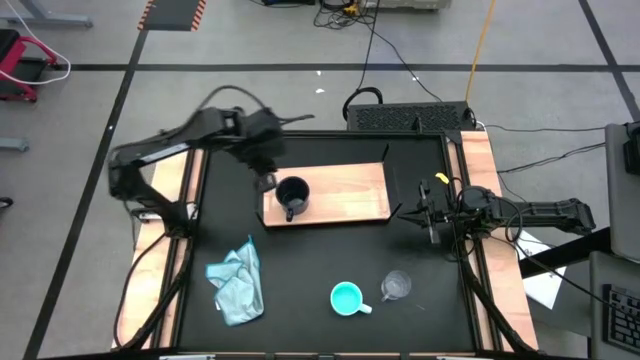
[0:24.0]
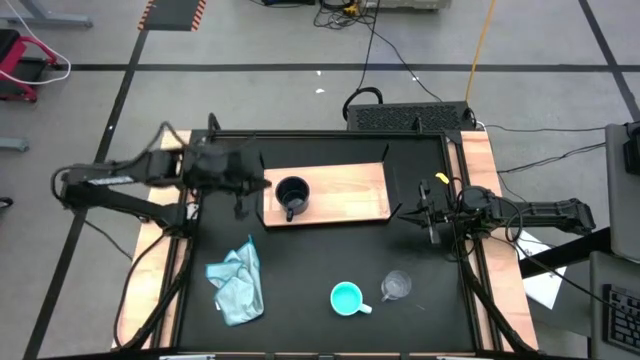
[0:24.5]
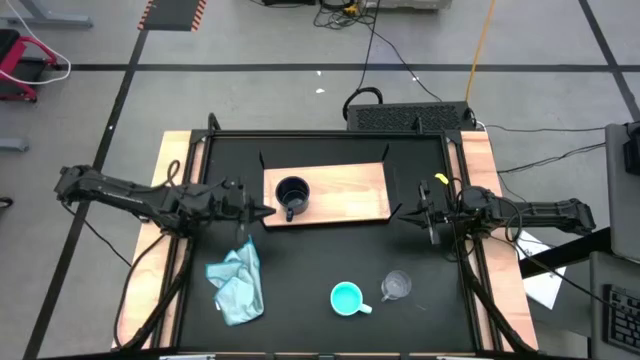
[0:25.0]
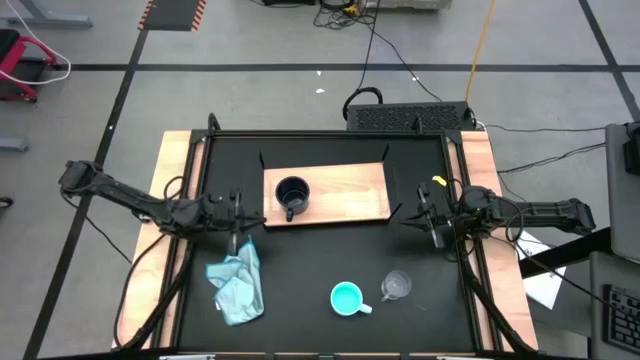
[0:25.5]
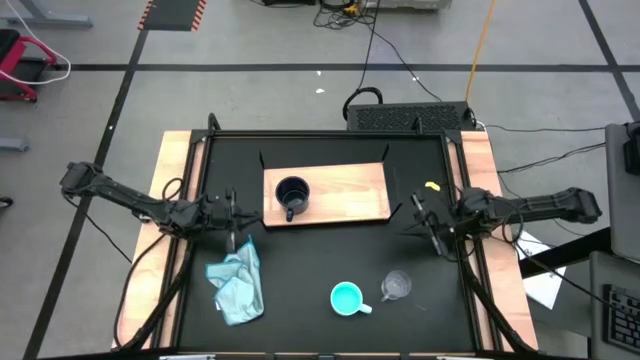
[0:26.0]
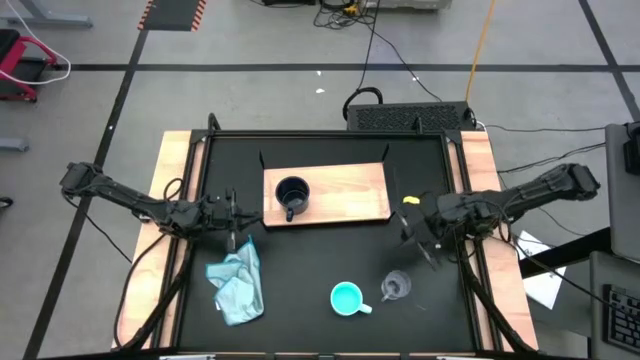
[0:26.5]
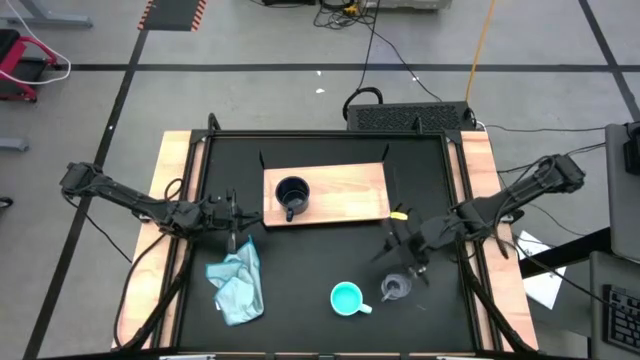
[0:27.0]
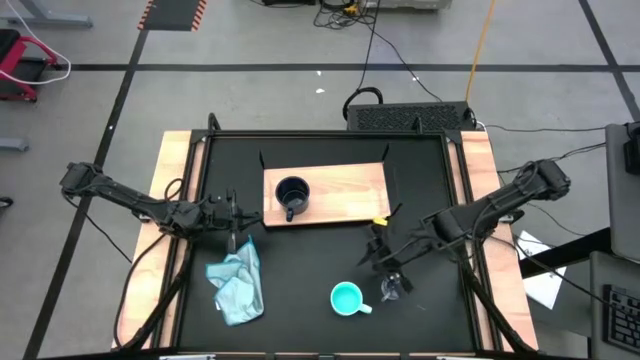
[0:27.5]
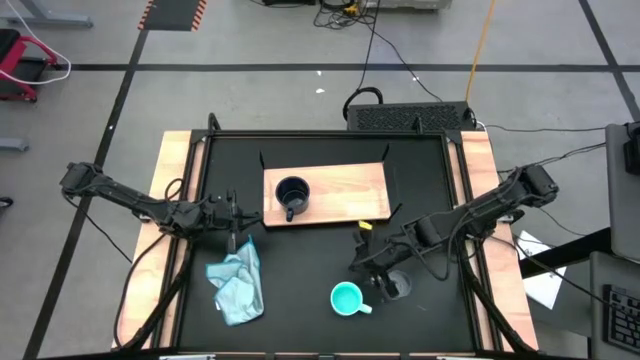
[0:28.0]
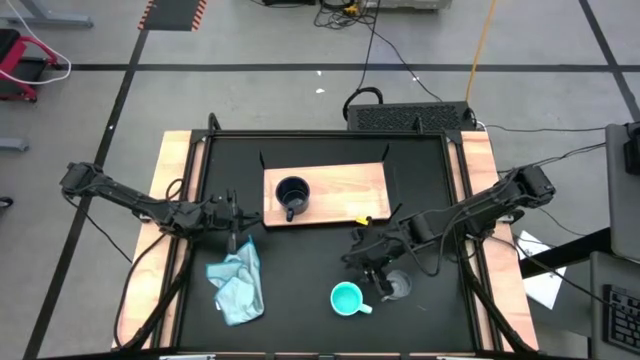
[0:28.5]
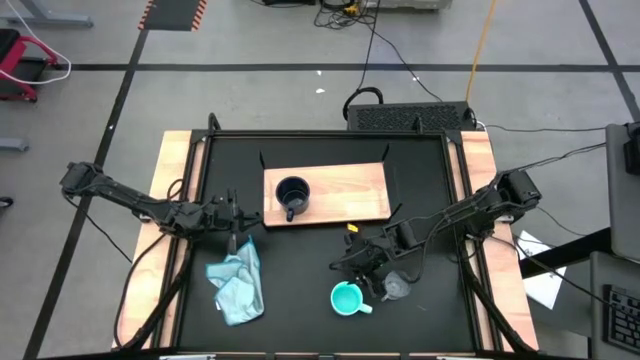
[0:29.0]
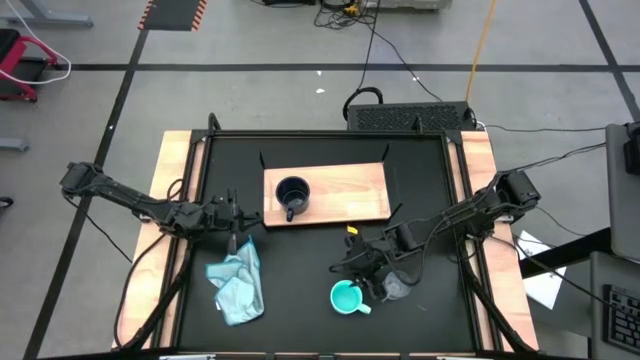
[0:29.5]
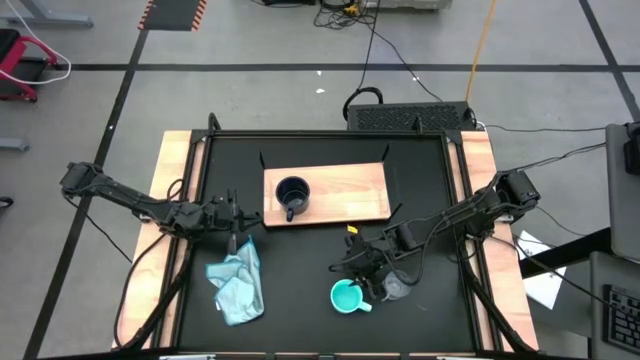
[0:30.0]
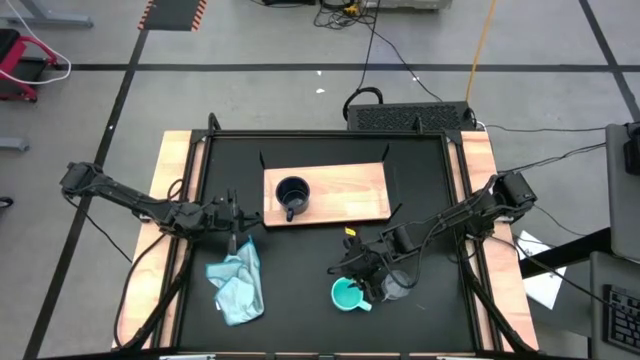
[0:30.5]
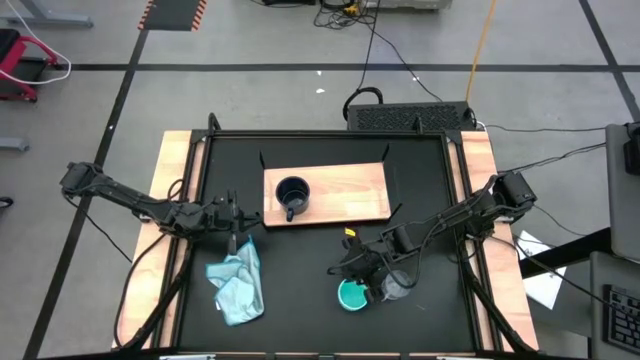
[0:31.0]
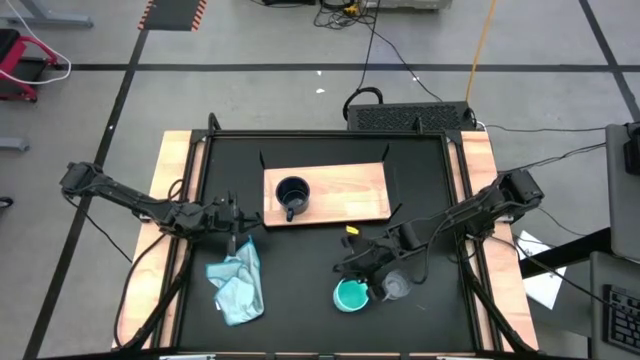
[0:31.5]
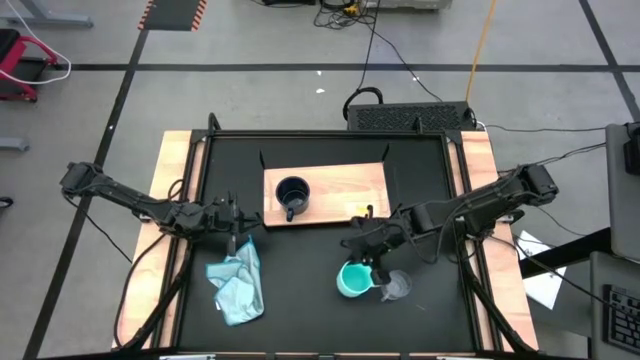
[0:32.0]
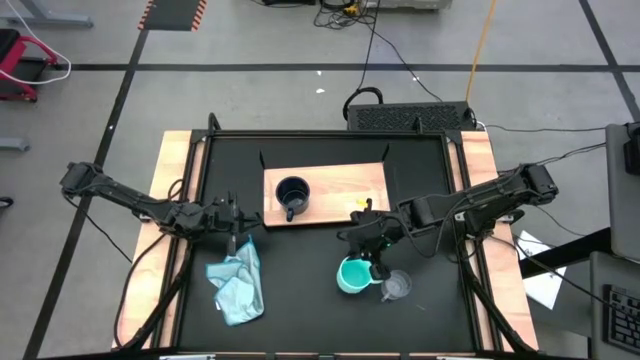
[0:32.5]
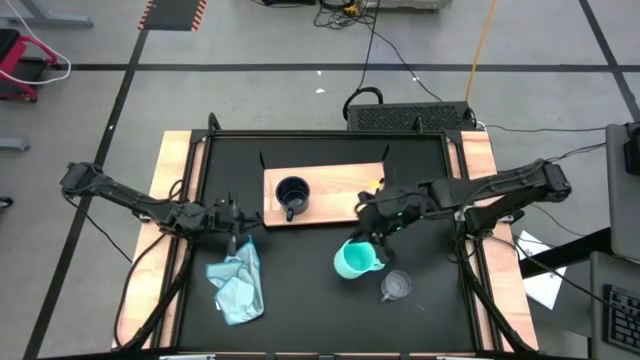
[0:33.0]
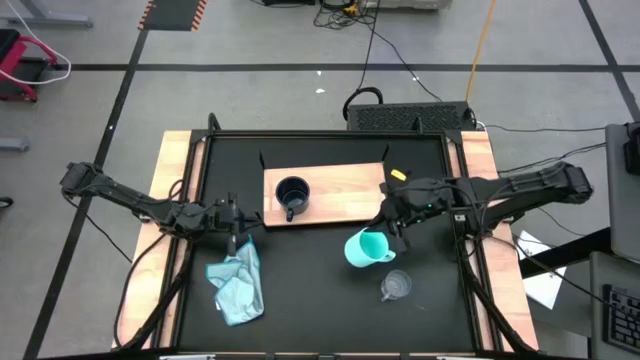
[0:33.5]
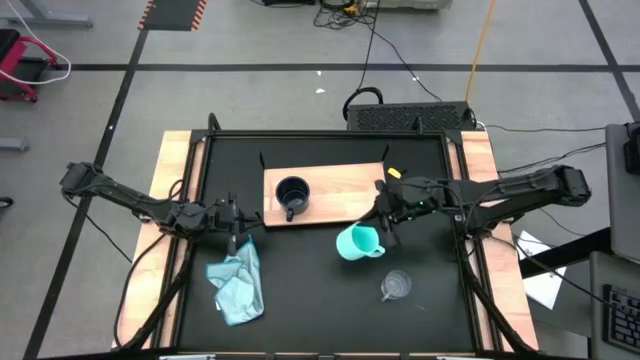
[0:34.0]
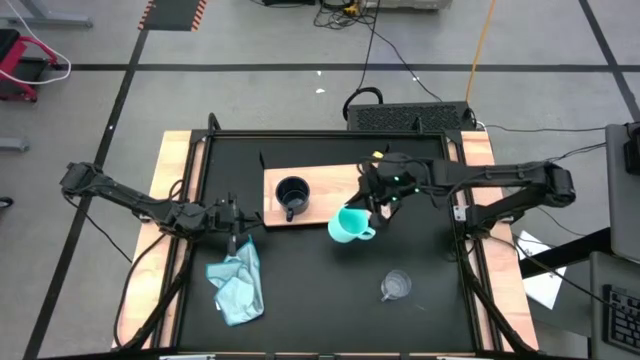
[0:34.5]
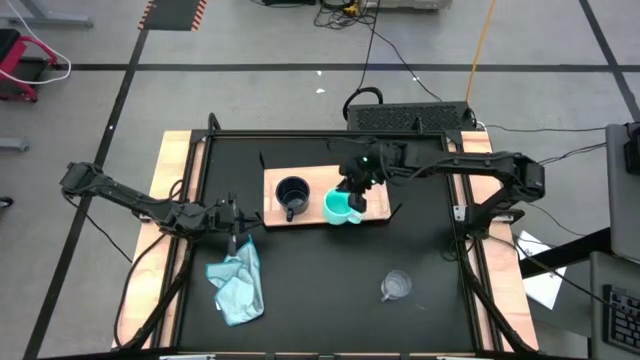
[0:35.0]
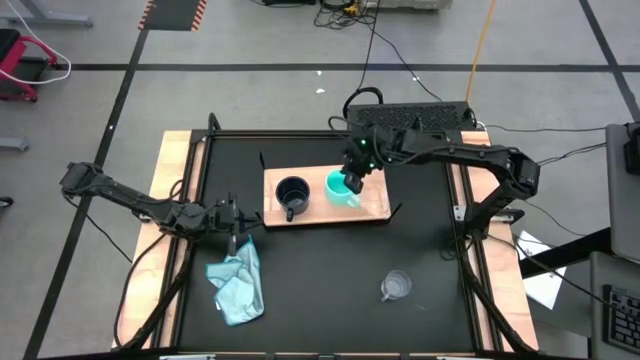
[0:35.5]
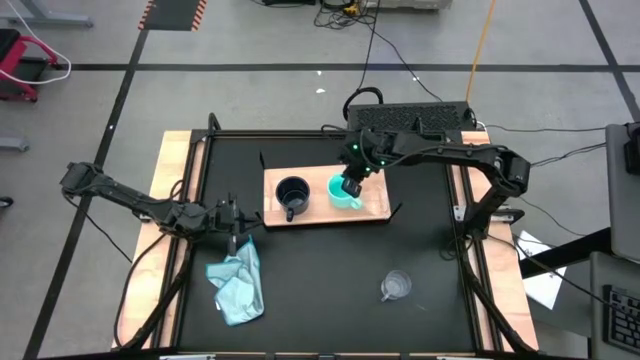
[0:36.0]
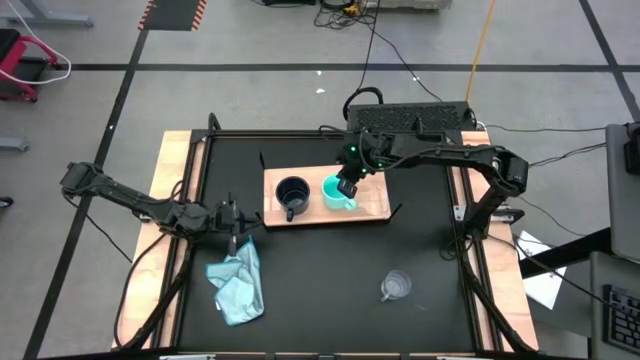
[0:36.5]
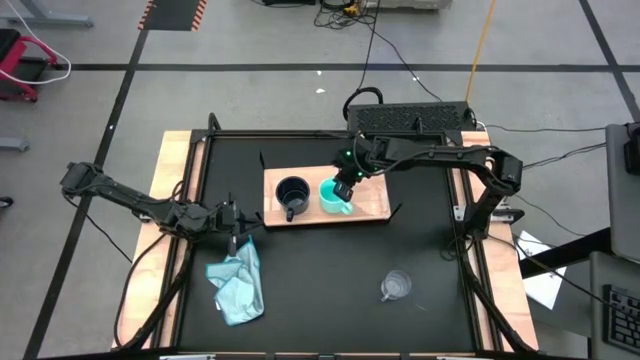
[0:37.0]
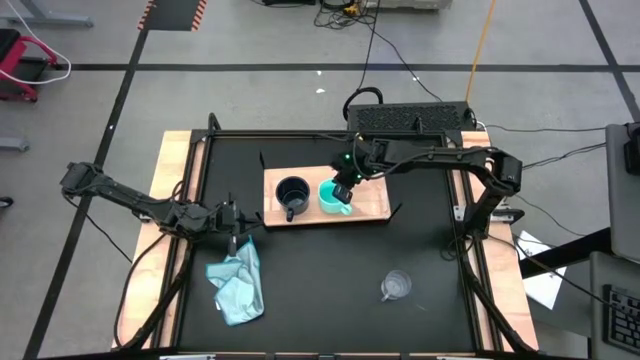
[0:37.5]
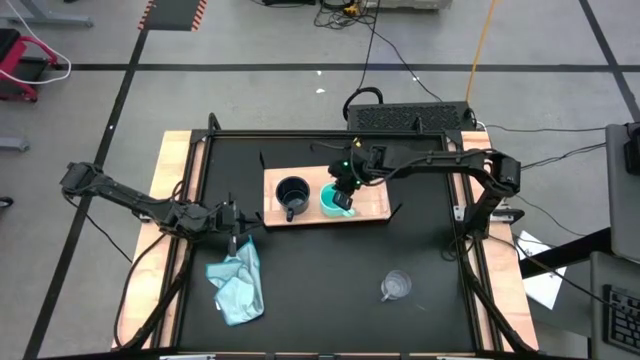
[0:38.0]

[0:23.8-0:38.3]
Task: Stack small to large cups/mugs on shelf
Put the light blue mug to the right of the dark blue mug on the shelf

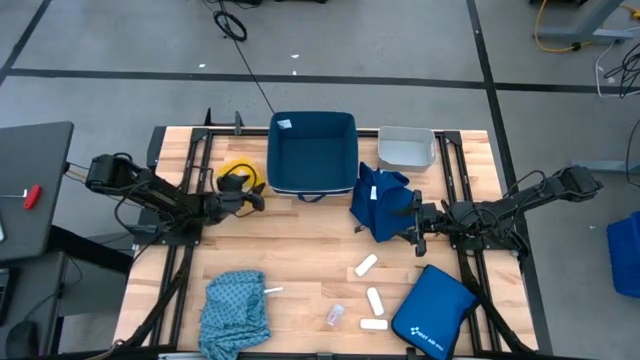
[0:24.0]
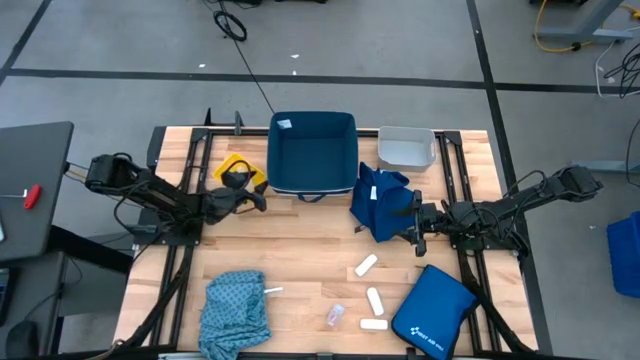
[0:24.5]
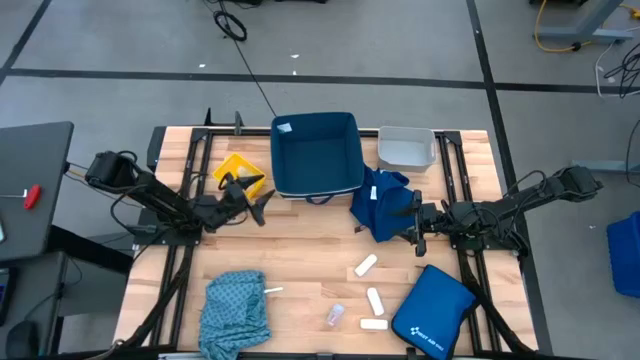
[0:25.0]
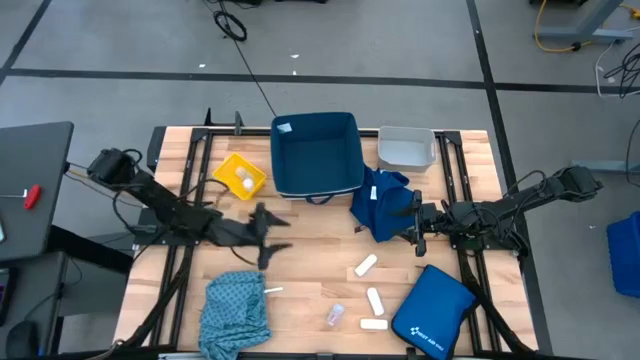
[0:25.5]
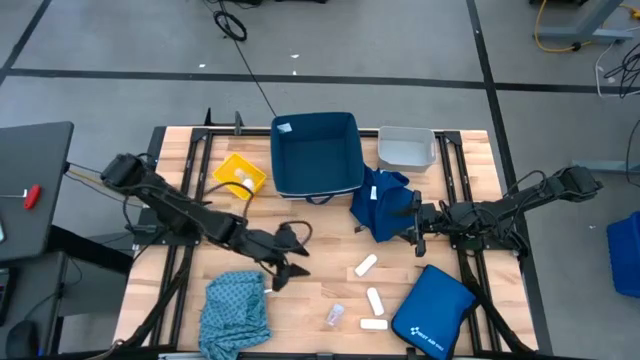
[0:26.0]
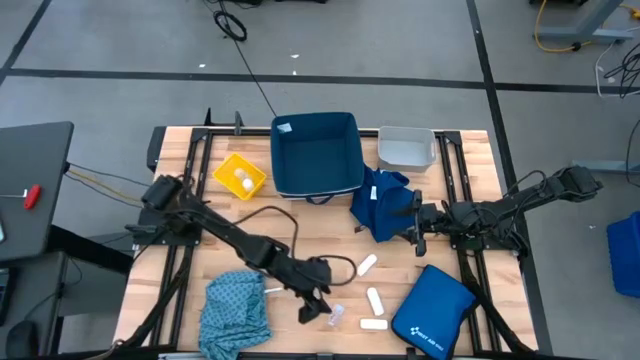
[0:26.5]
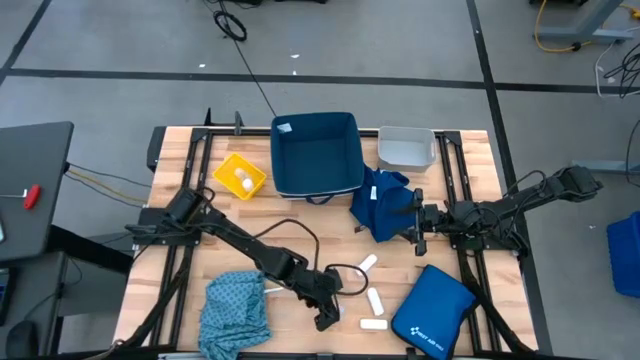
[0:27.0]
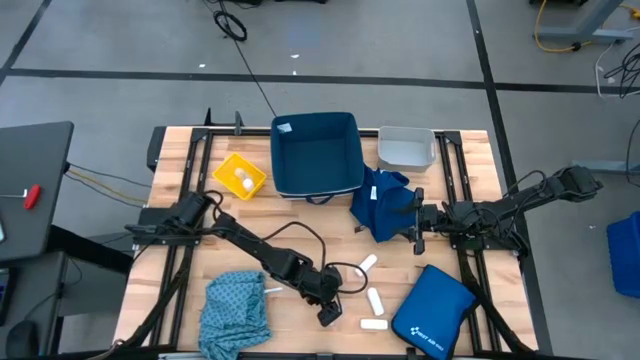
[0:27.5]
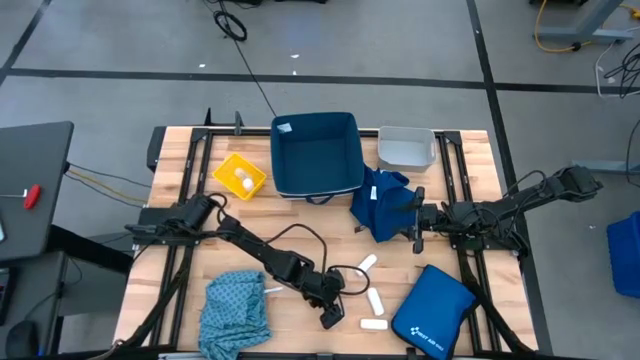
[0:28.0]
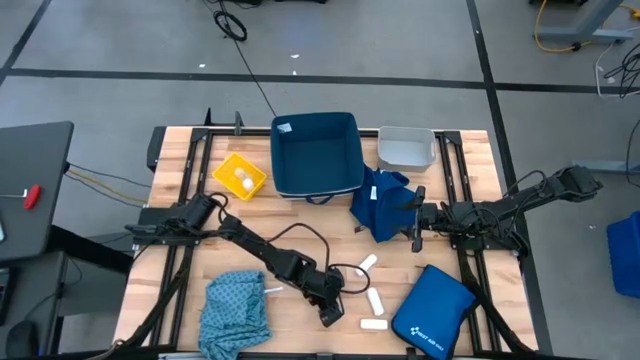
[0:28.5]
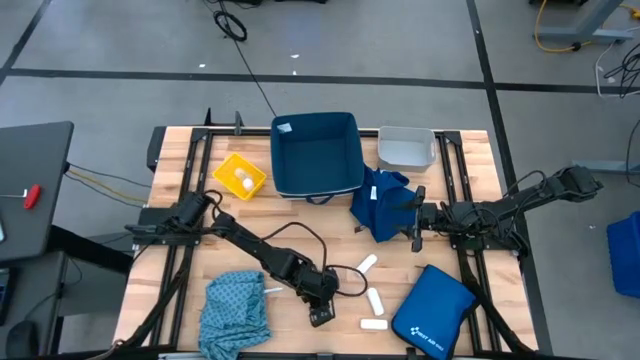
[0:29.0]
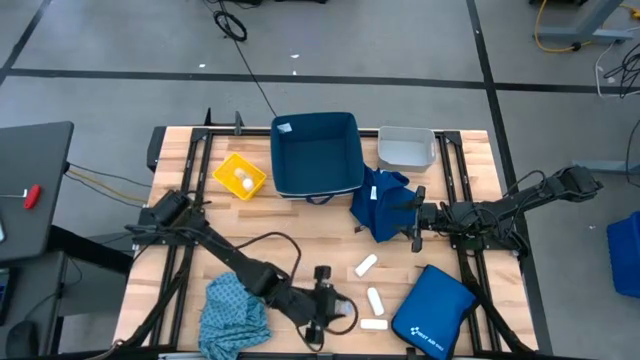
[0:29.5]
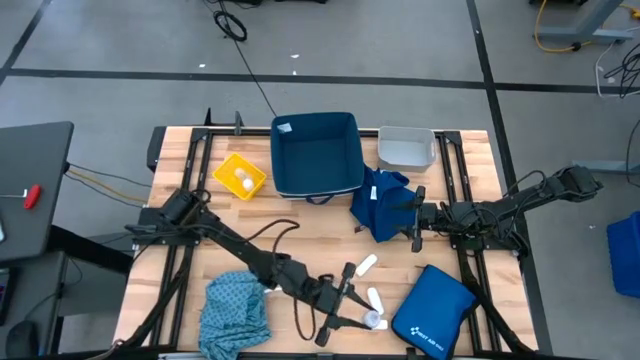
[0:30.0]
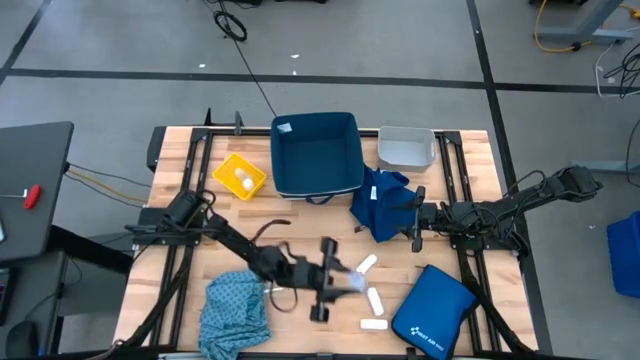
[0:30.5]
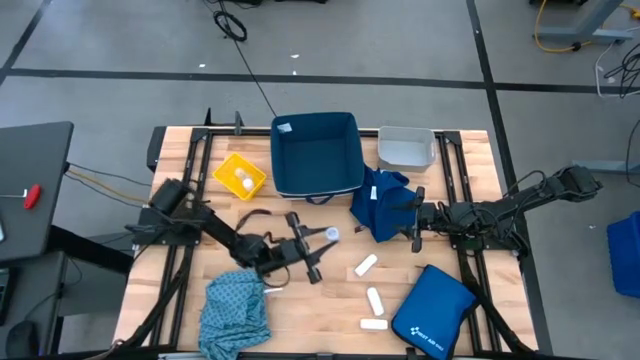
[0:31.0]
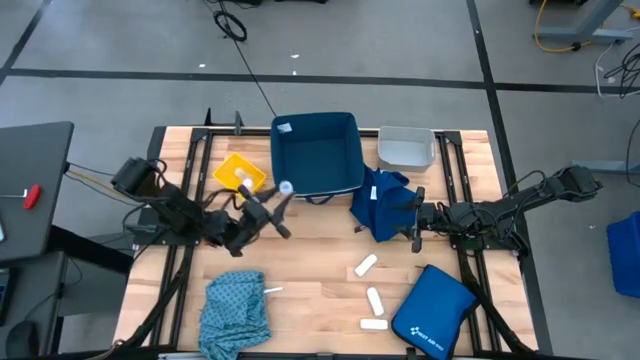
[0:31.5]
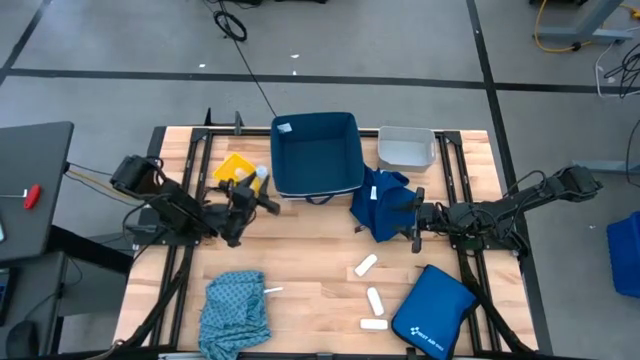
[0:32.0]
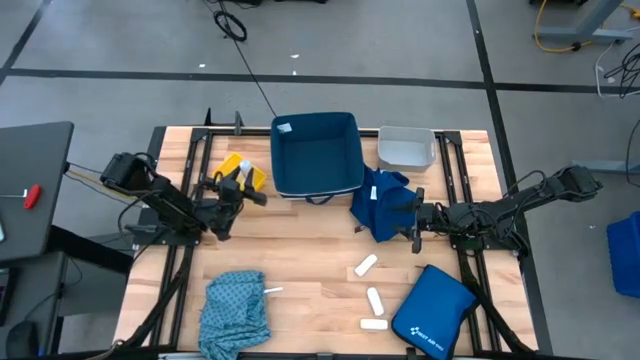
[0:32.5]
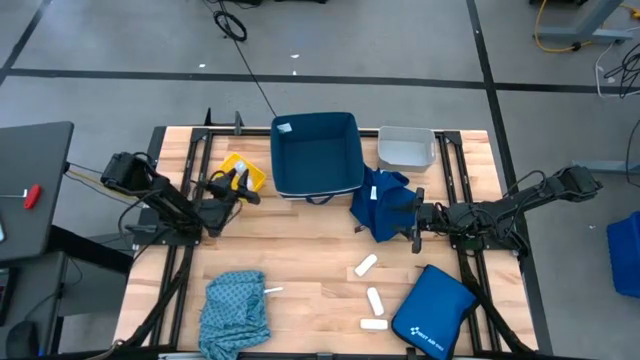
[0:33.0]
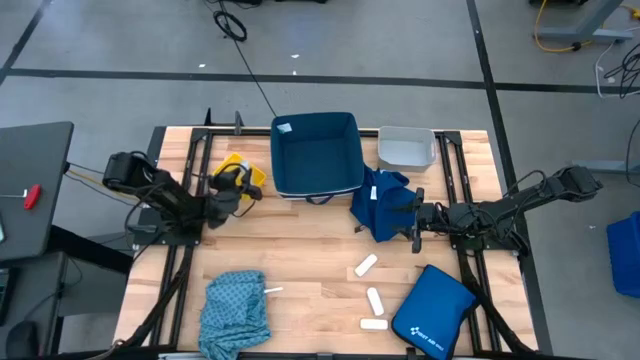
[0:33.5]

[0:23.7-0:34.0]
Task: Pick & place medical supplies in basket/bin
Put the white pill bottle into the basket
